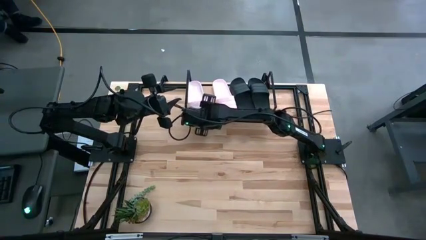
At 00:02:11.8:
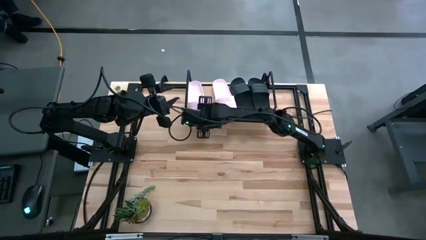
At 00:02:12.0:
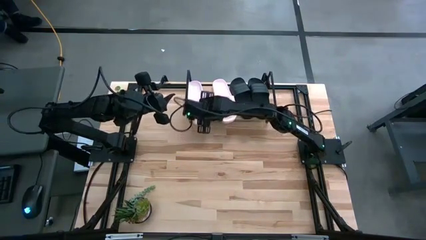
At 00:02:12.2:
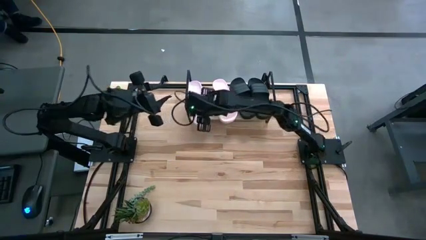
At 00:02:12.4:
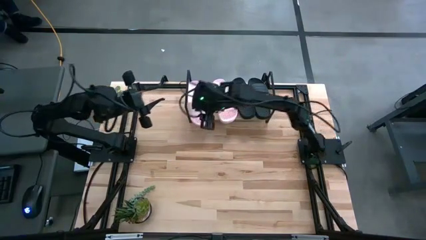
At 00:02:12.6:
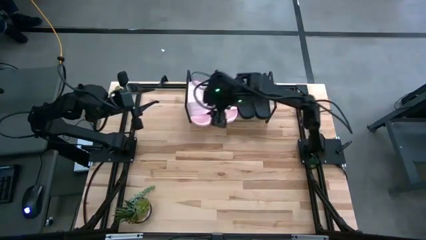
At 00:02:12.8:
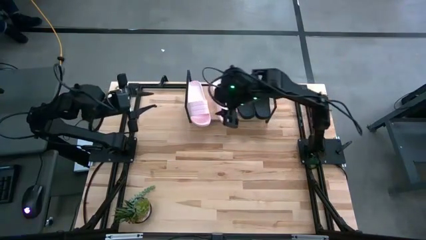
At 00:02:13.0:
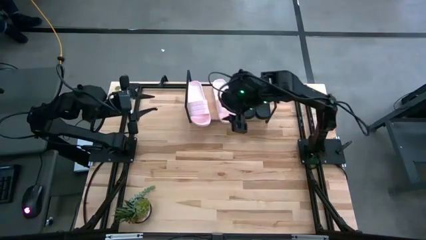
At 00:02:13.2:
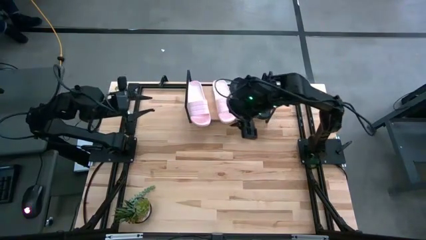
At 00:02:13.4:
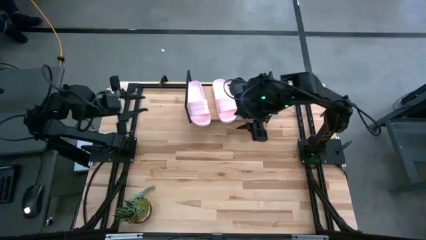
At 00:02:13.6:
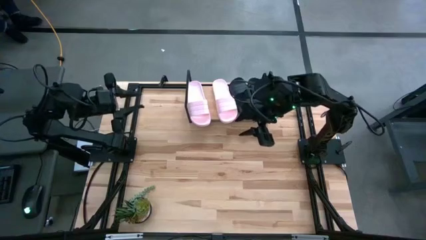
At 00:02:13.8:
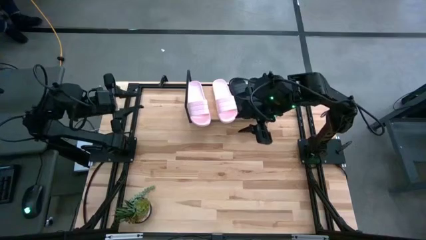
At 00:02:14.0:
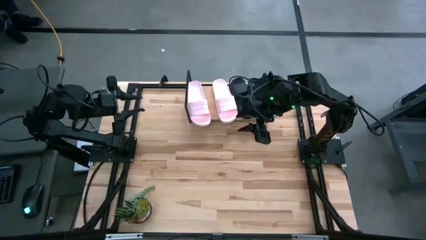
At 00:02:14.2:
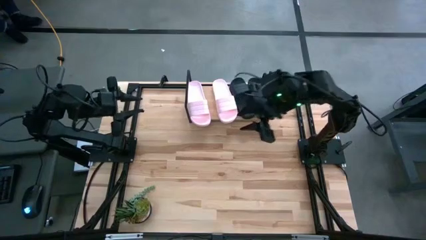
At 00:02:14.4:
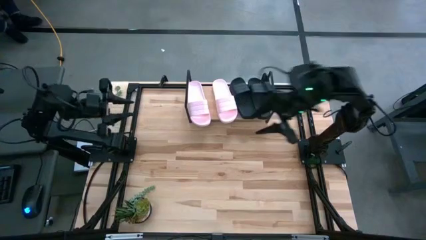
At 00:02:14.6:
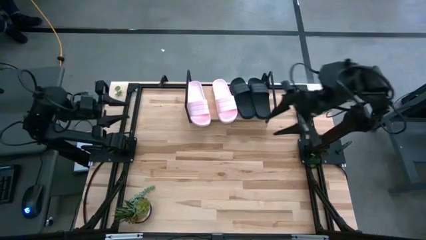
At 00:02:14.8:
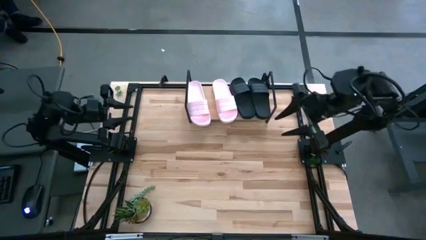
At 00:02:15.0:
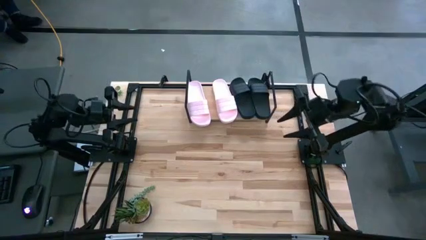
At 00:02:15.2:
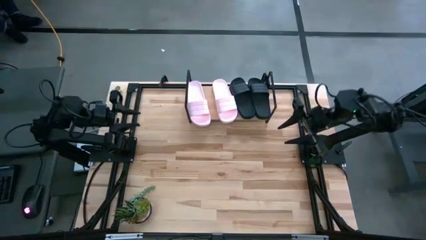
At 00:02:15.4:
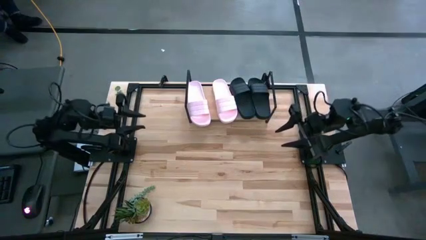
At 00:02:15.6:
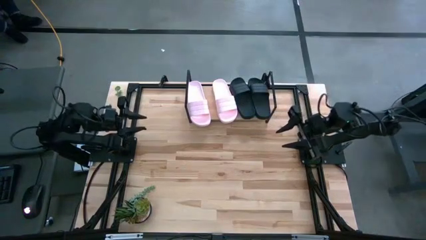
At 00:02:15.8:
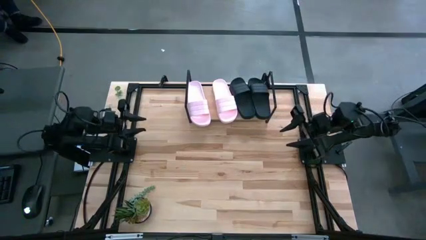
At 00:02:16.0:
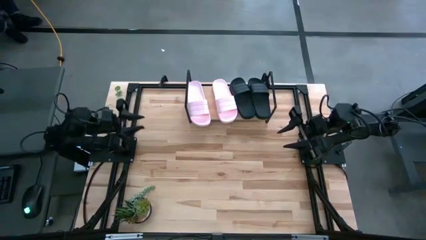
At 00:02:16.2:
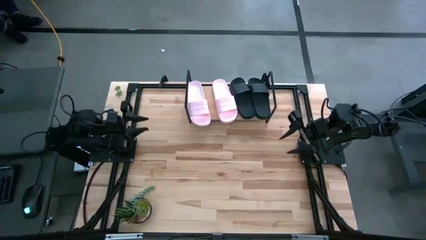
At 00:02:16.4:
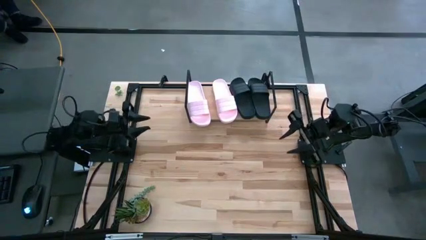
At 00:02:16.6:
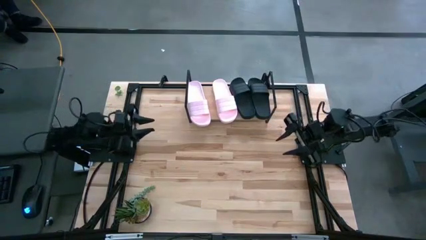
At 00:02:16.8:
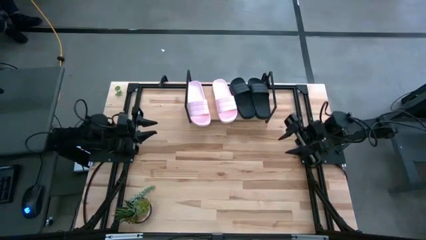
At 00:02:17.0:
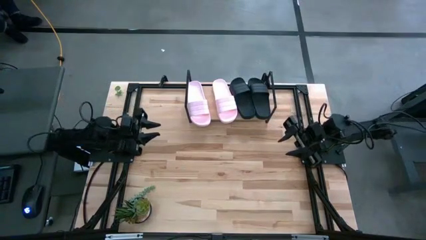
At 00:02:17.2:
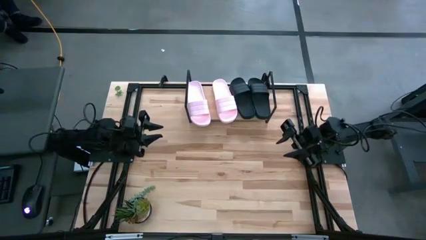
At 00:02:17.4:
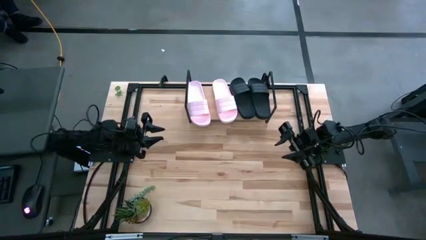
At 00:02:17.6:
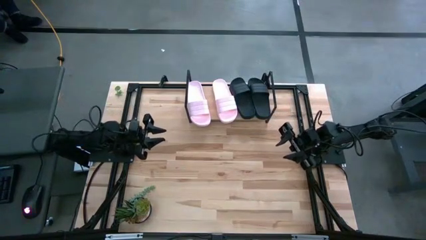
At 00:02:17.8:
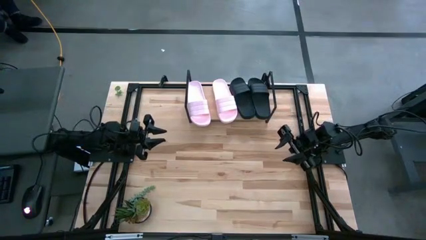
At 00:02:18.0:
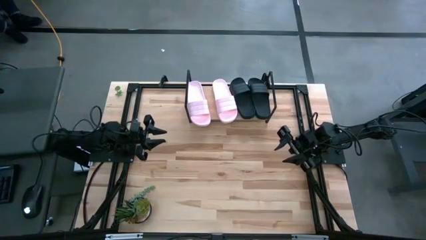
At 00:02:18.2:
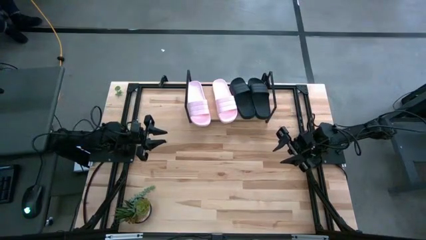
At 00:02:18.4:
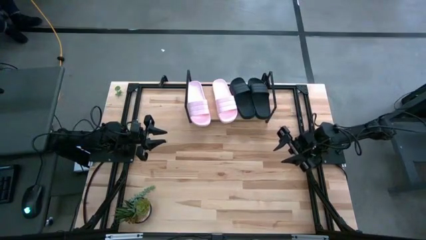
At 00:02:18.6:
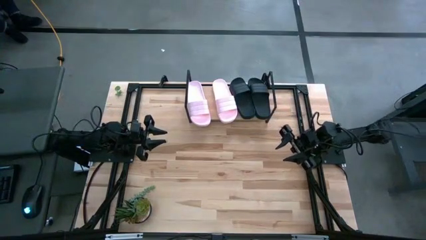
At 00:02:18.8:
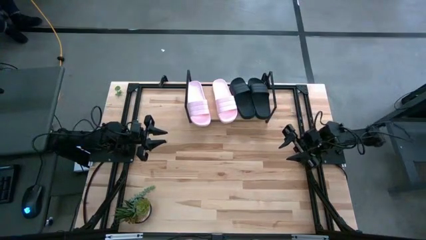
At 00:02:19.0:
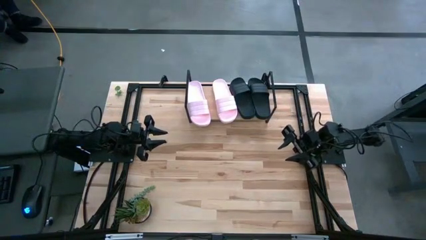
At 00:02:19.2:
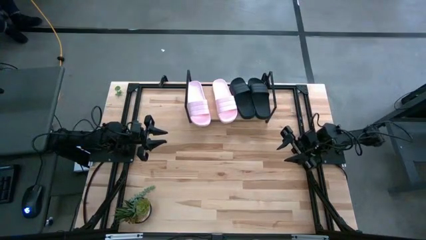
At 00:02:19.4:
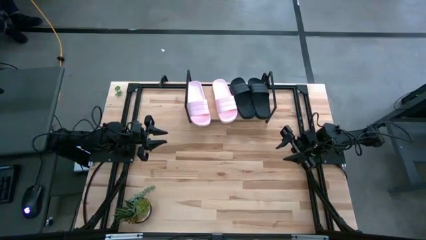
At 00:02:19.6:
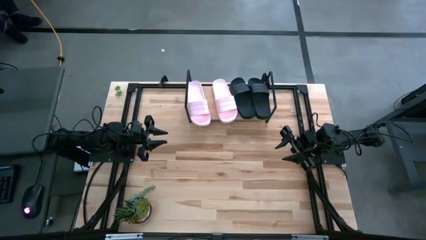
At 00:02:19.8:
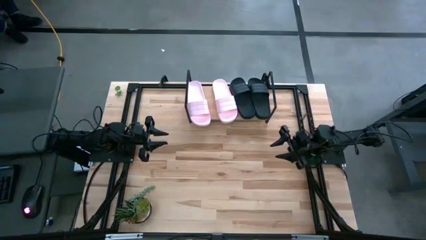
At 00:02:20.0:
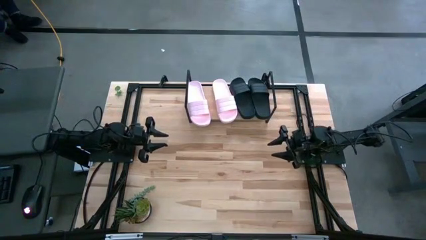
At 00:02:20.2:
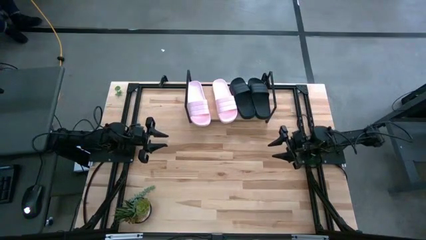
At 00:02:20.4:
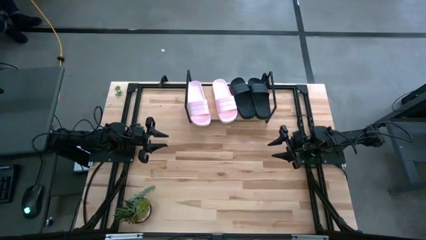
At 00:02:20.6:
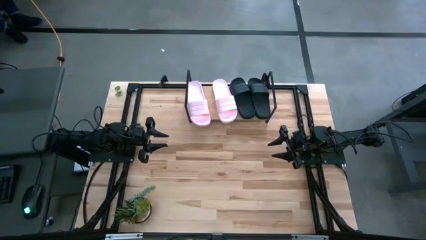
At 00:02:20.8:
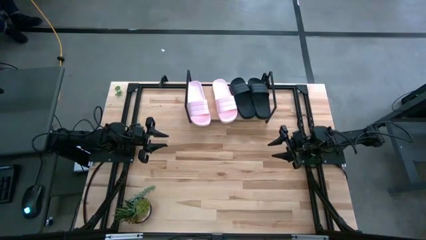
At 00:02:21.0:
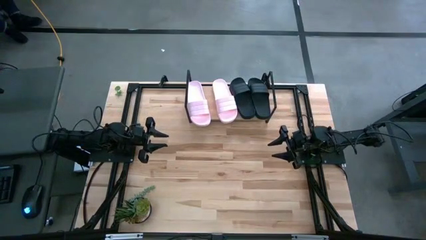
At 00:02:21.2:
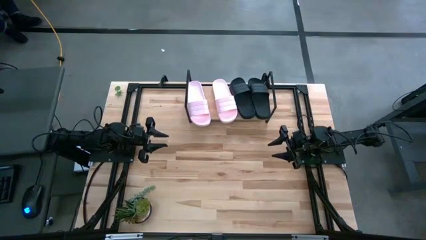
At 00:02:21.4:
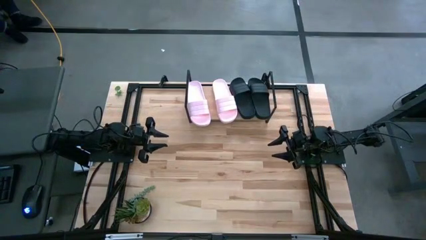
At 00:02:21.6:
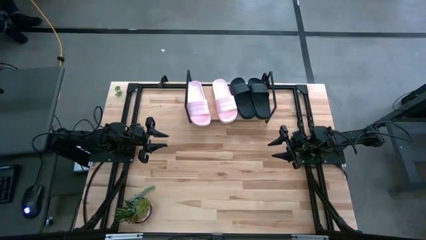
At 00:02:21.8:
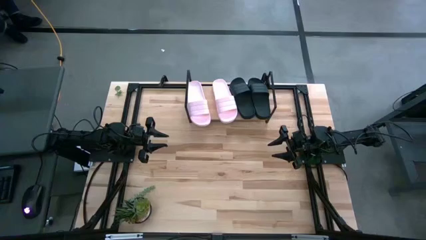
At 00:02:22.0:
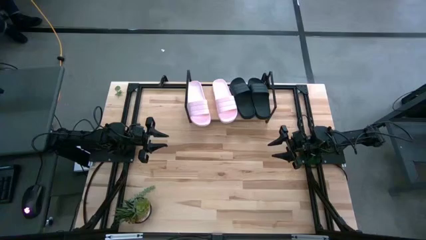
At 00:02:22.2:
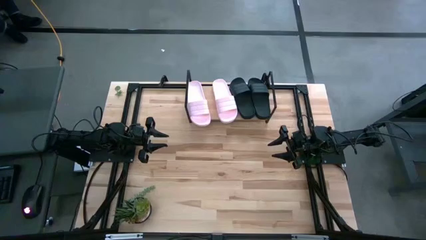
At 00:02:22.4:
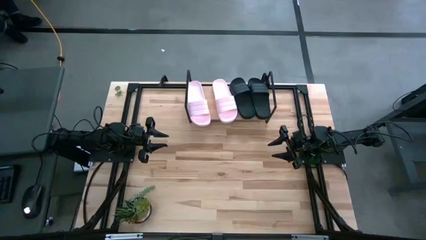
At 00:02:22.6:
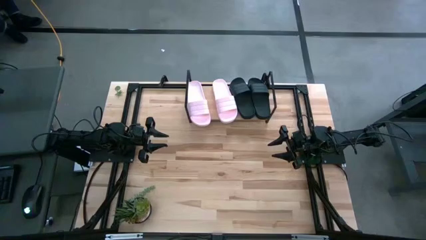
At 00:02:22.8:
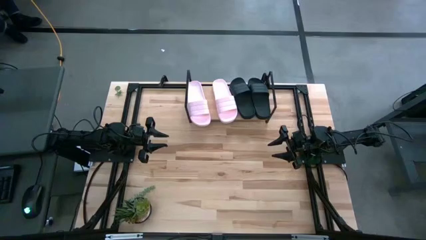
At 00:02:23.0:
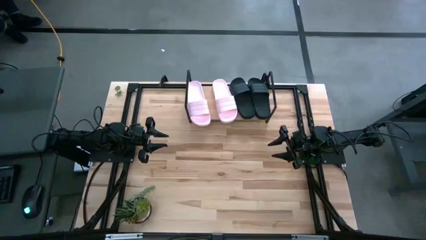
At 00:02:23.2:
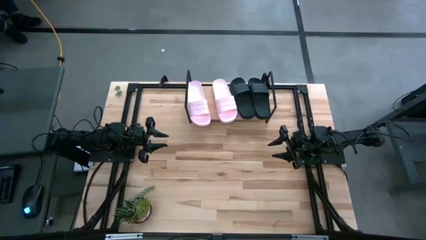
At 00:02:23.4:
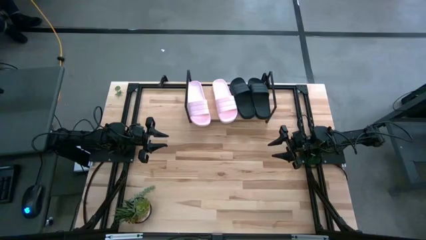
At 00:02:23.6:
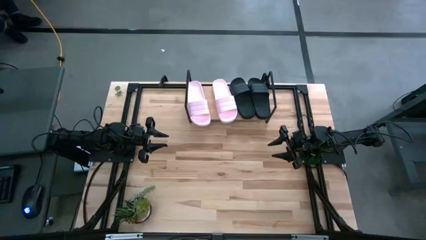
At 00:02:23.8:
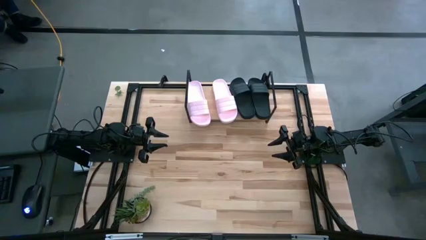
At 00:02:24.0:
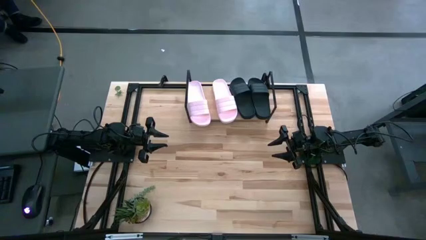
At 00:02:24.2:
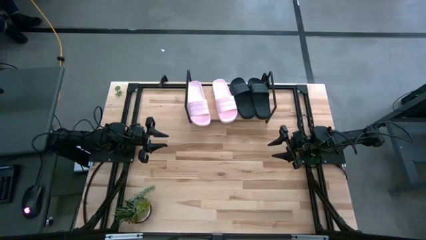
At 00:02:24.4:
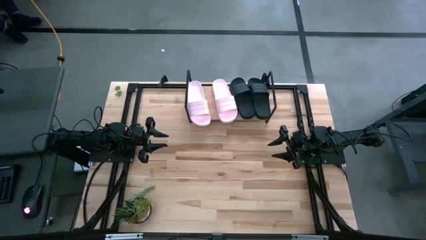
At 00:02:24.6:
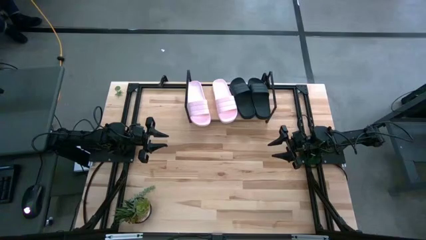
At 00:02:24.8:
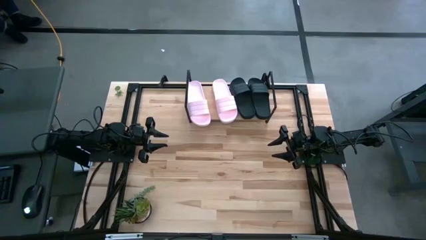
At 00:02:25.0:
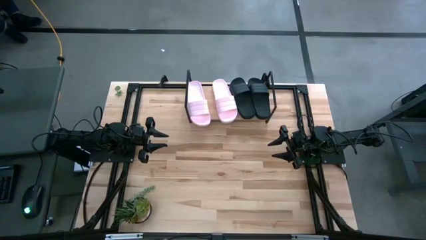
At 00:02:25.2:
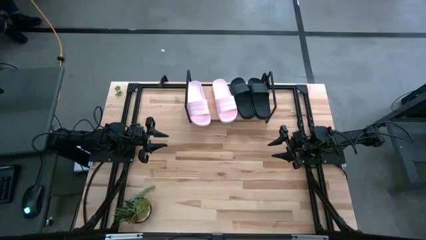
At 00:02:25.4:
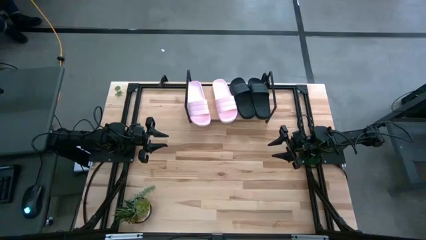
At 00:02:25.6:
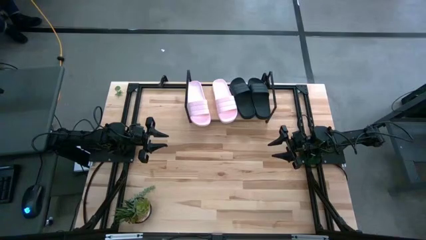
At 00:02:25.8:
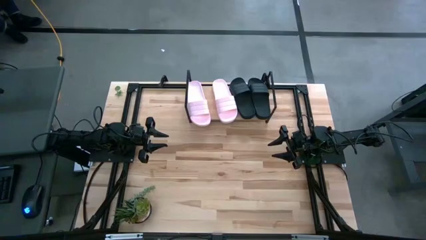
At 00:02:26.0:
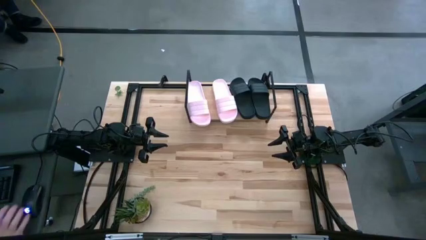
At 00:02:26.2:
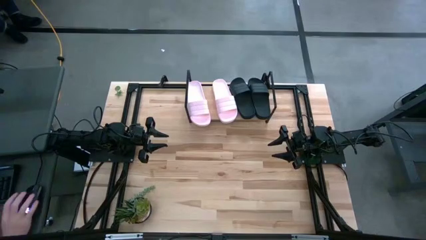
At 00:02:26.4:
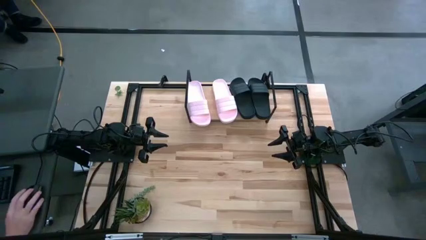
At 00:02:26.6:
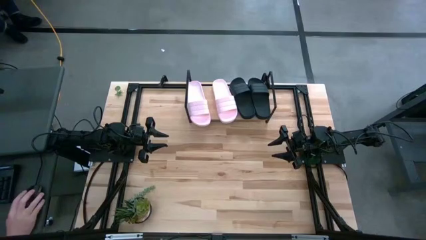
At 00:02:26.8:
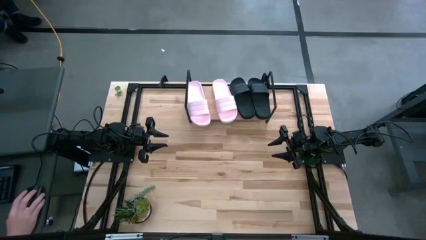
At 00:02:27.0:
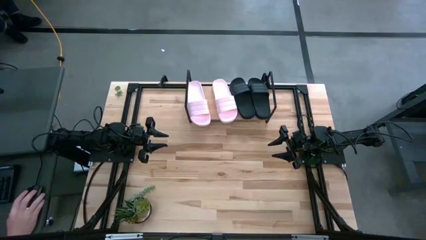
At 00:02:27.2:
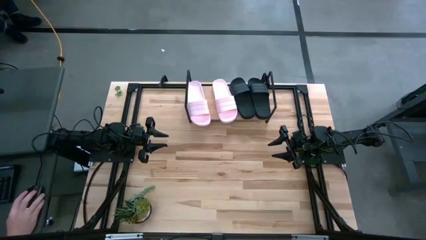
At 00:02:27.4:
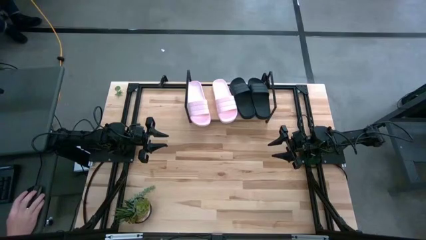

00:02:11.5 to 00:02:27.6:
Task: Pick and place slides into the shelf
Return to Home Position
